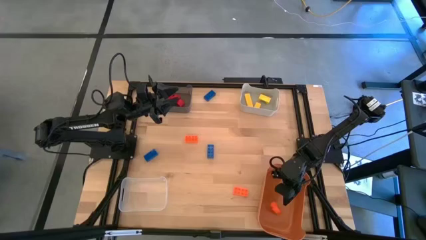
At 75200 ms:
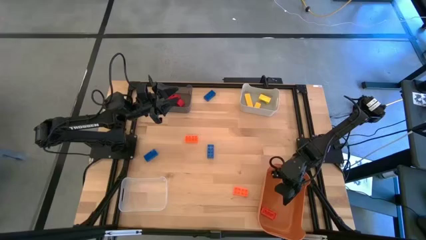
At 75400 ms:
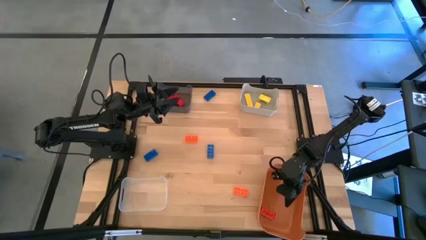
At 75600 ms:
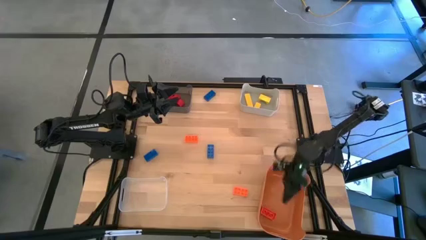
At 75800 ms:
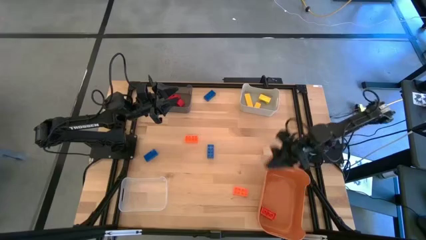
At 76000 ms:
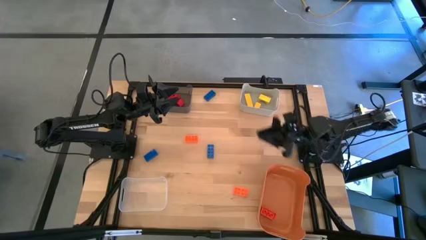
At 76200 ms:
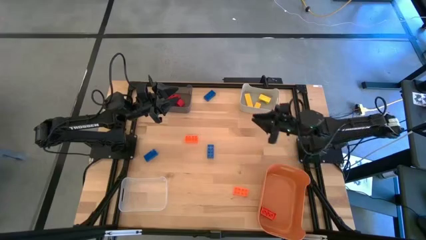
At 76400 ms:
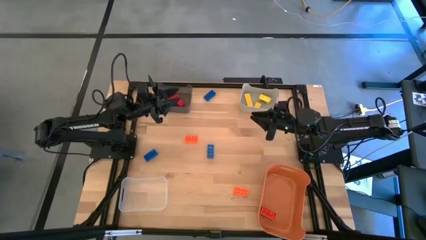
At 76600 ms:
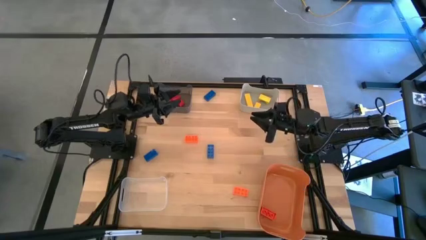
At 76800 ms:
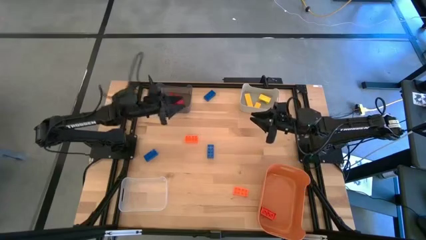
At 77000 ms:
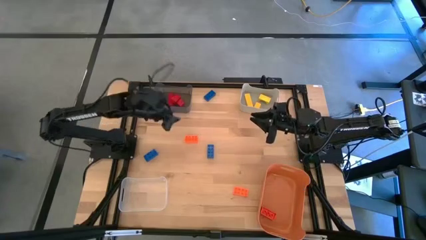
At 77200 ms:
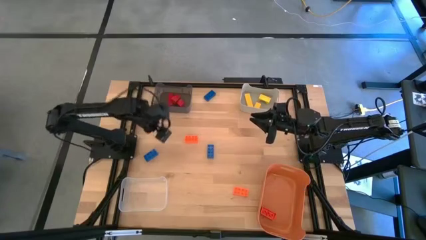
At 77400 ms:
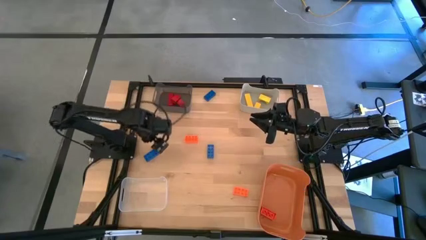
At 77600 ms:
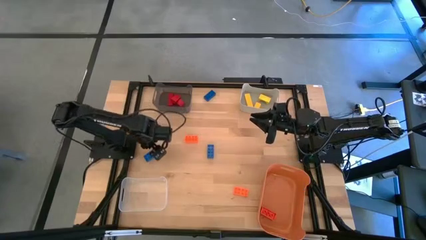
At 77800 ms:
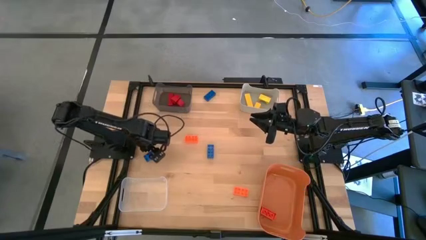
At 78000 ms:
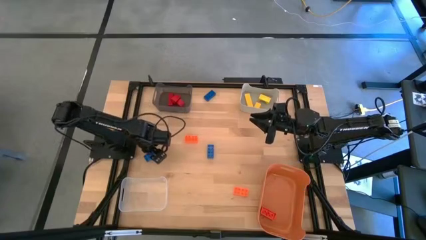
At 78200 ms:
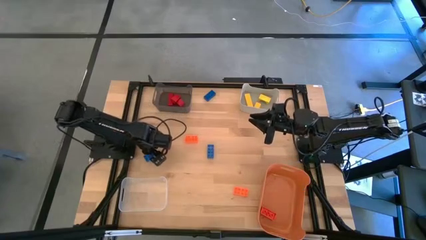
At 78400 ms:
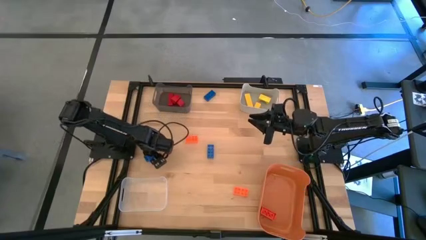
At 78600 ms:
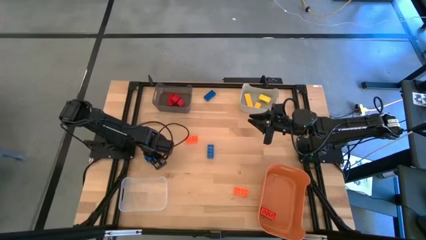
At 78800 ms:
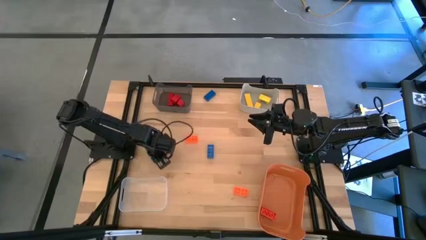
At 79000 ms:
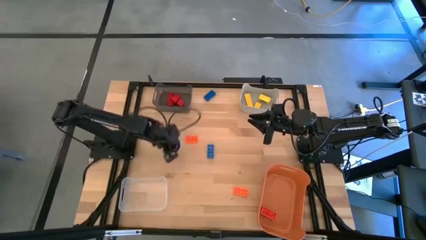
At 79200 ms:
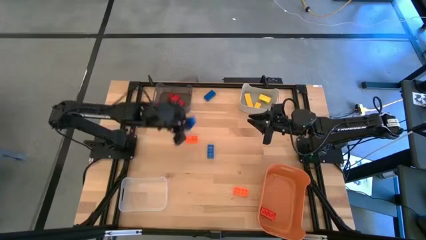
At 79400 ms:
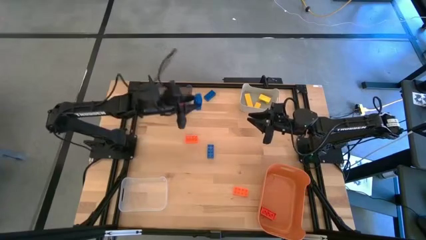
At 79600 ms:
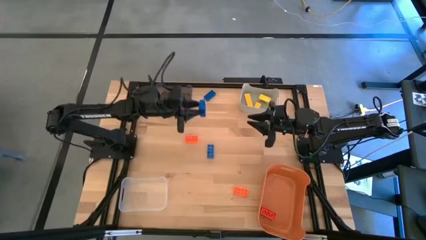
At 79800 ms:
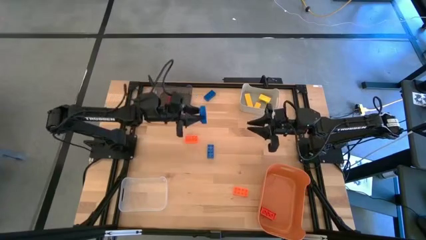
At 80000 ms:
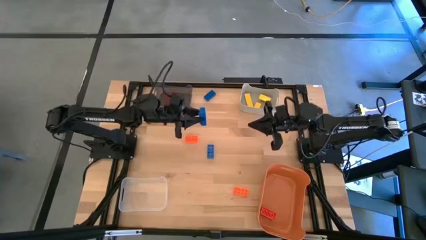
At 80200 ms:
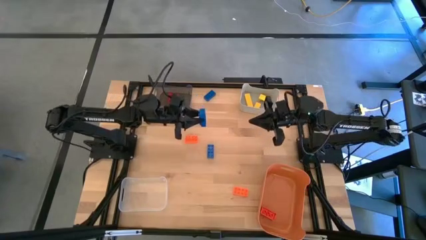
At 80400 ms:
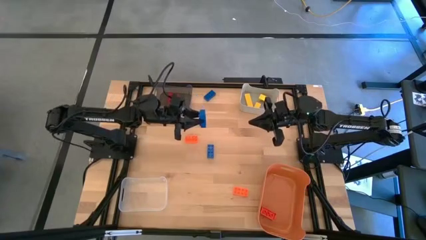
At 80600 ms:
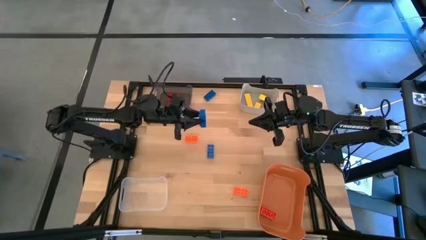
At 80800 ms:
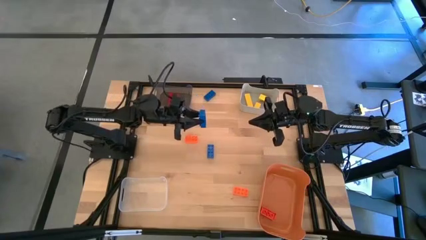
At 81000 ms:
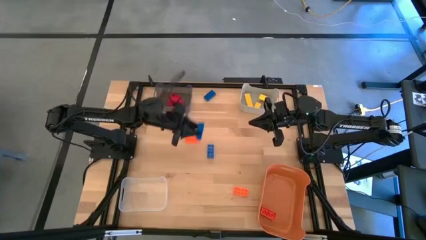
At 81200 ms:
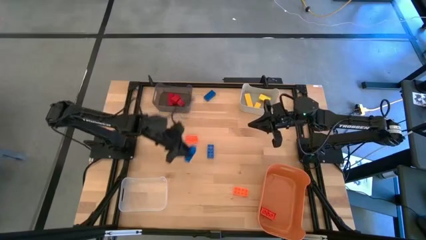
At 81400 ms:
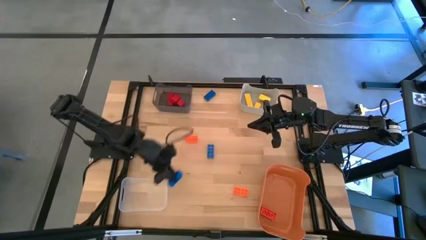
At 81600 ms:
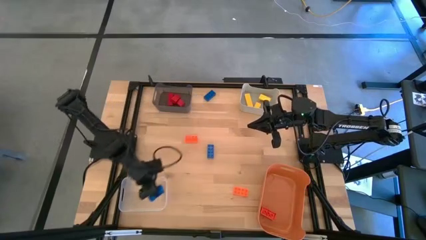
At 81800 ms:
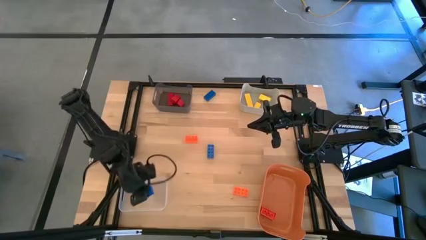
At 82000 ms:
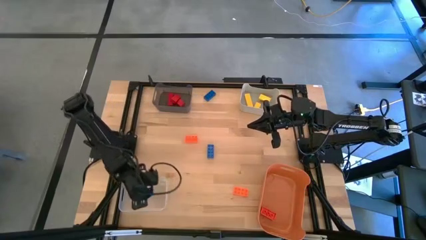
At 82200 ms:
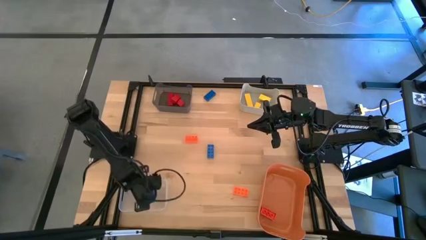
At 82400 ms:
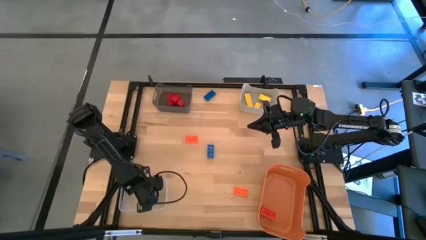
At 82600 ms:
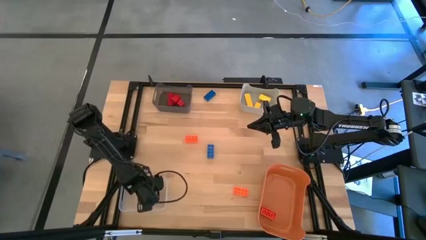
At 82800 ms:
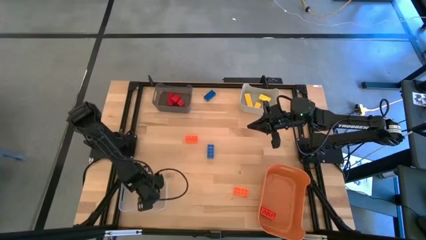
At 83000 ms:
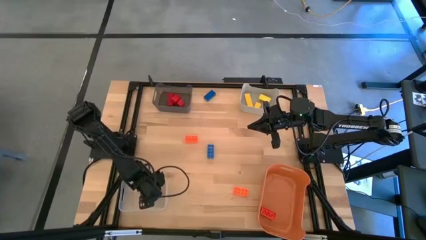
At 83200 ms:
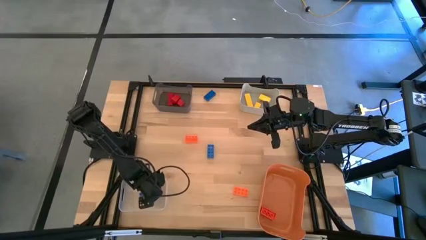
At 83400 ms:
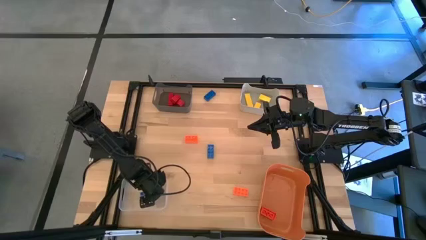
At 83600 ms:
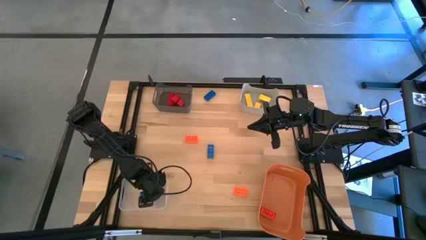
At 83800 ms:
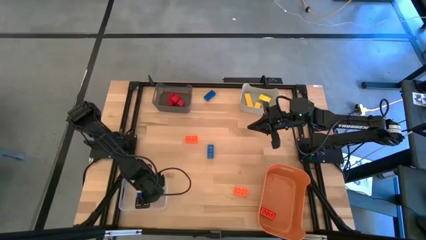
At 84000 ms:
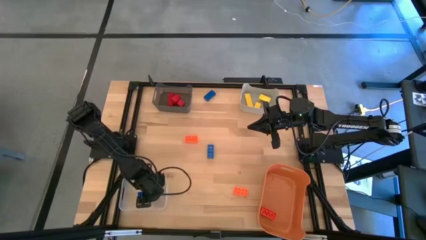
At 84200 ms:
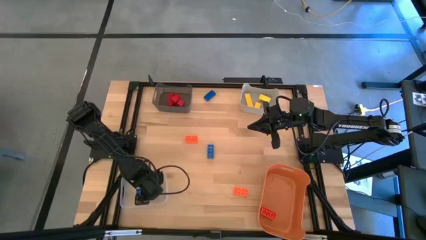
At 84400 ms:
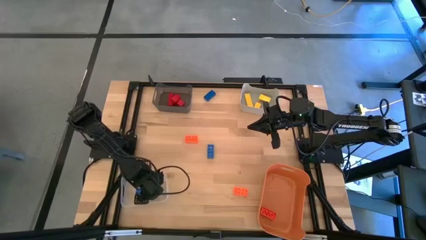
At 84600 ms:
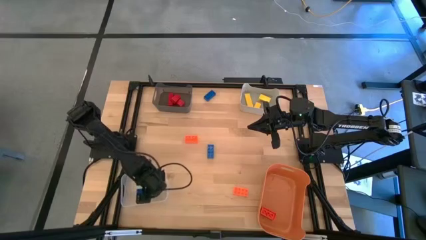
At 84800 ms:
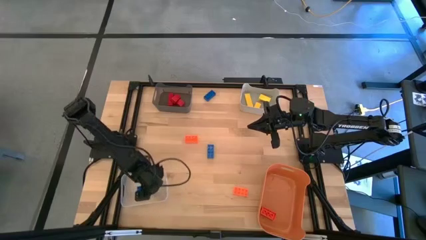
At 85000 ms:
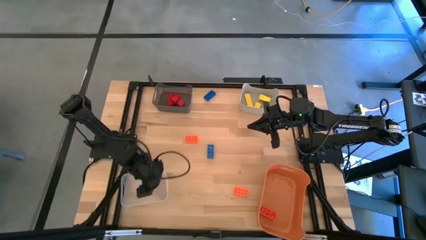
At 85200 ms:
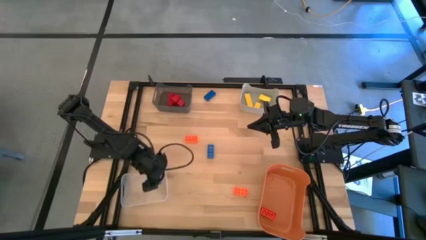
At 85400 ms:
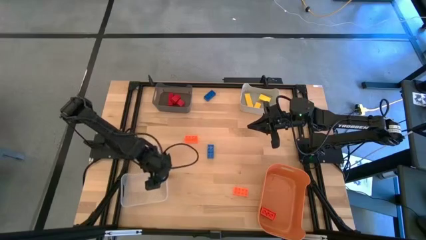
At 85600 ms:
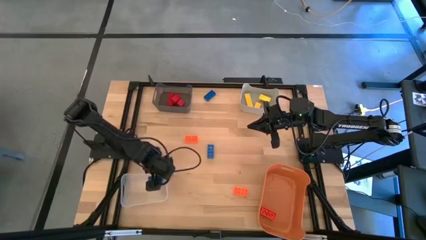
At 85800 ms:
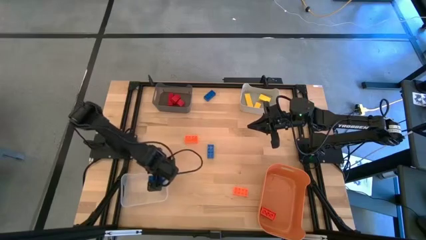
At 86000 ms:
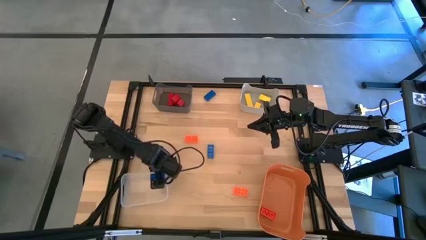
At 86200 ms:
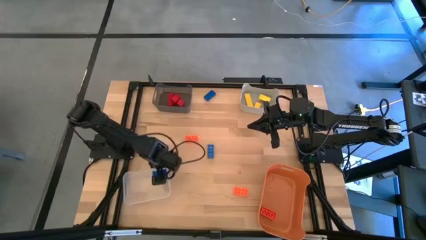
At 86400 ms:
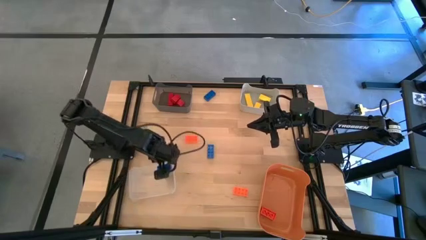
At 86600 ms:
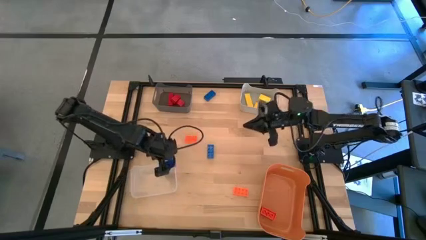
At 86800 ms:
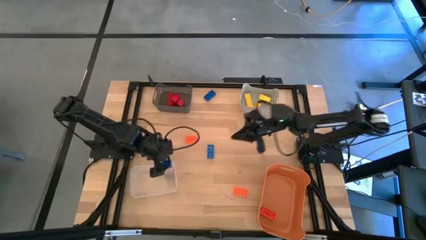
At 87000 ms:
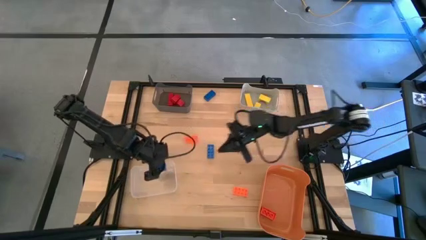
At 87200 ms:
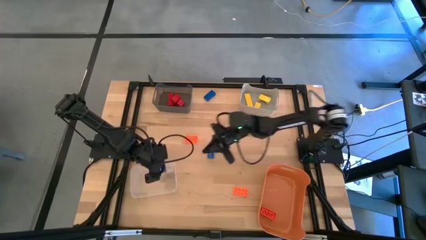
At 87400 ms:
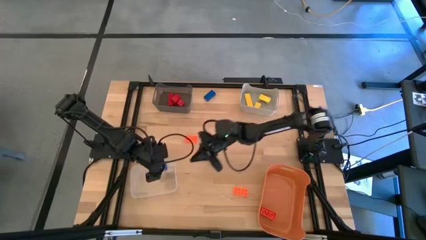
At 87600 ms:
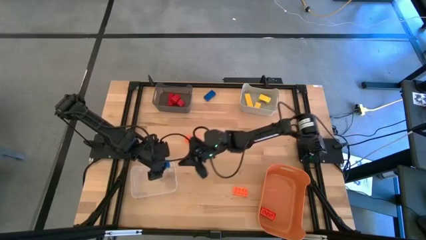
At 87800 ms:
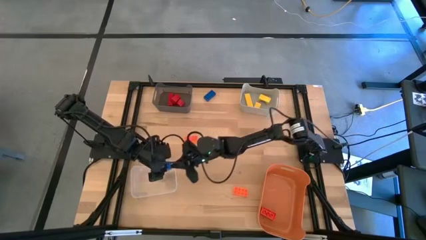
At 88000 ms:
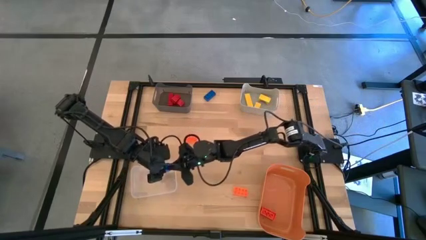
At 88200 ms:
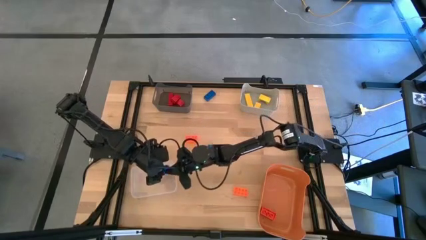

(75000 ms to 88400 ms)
Task: Sort & place blocks by color
Put the bottom left blue game piece into the transparent bin
